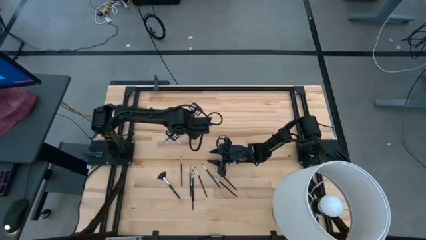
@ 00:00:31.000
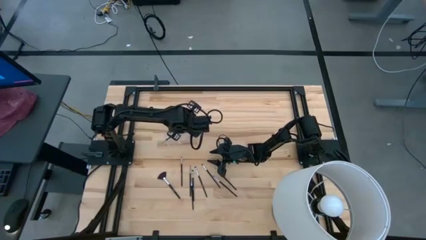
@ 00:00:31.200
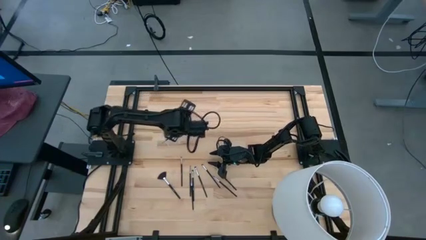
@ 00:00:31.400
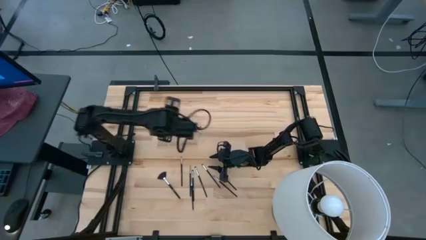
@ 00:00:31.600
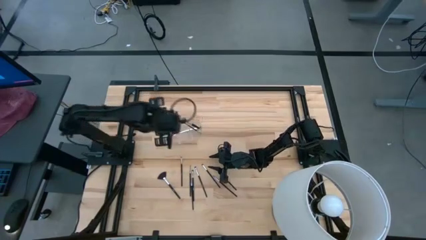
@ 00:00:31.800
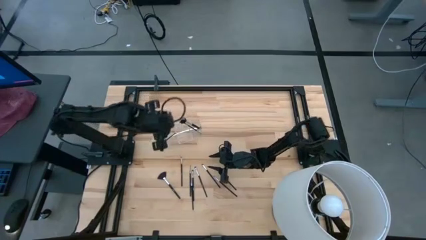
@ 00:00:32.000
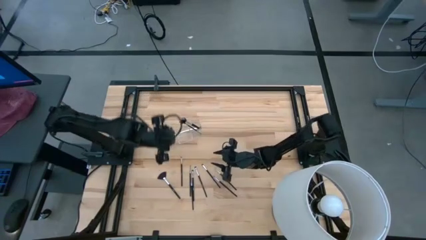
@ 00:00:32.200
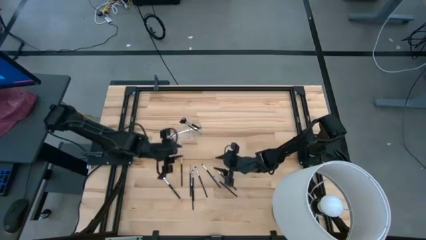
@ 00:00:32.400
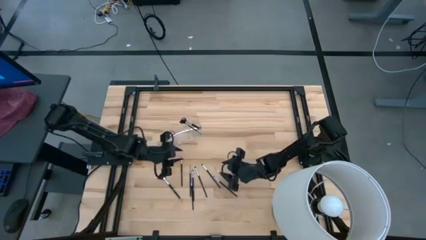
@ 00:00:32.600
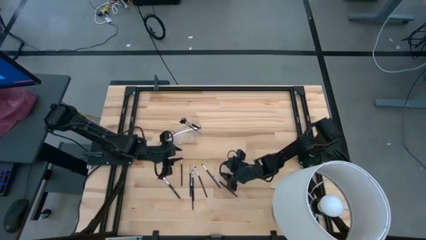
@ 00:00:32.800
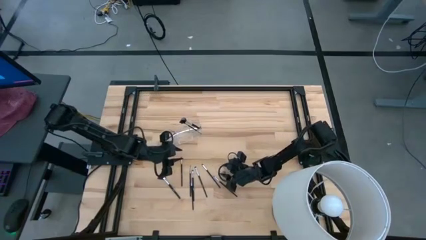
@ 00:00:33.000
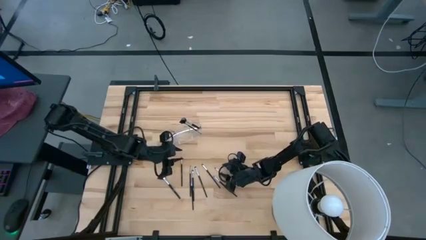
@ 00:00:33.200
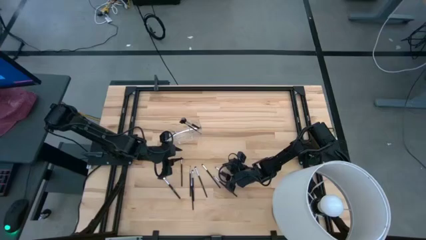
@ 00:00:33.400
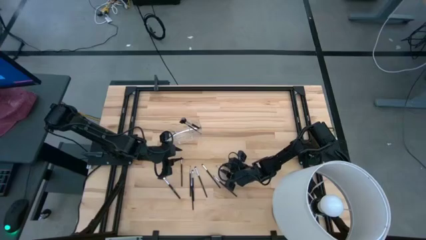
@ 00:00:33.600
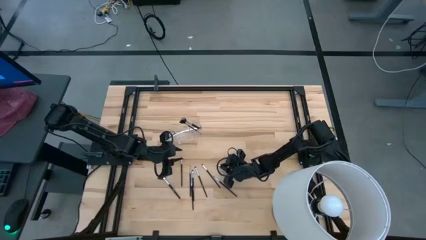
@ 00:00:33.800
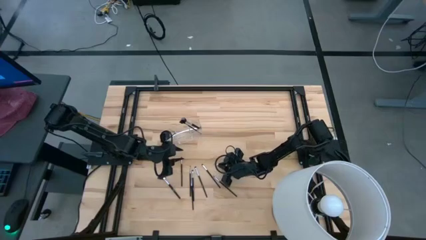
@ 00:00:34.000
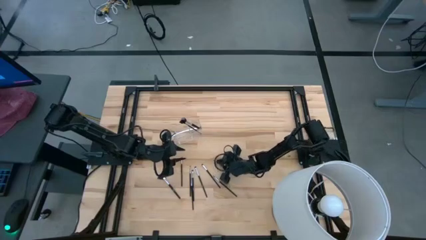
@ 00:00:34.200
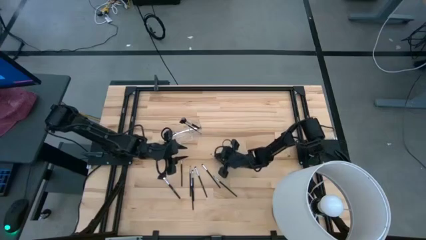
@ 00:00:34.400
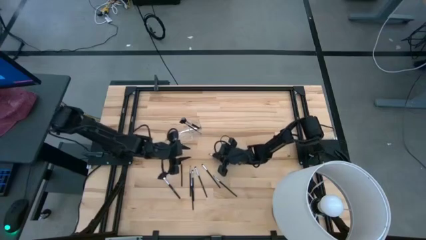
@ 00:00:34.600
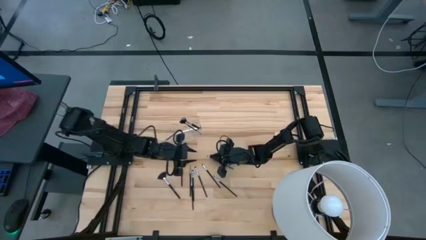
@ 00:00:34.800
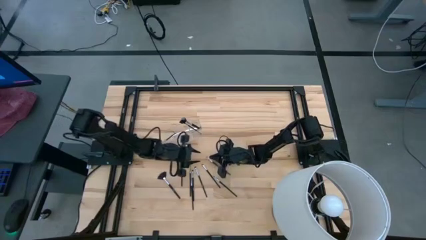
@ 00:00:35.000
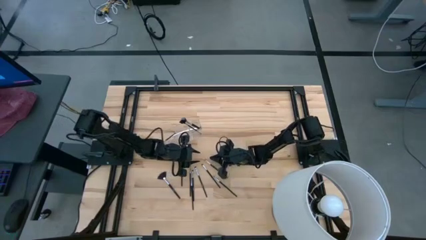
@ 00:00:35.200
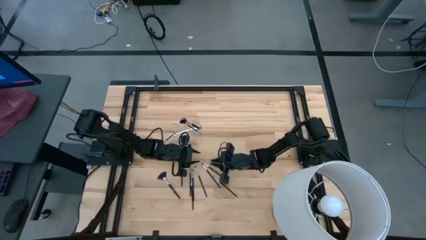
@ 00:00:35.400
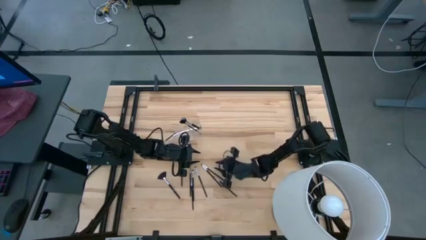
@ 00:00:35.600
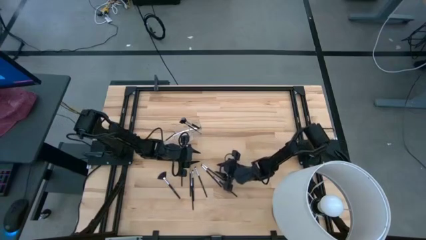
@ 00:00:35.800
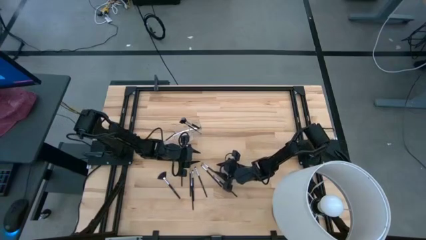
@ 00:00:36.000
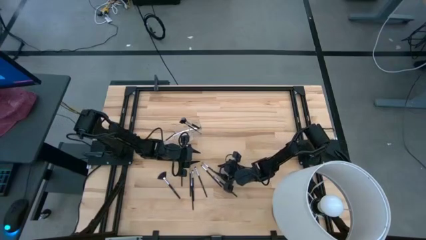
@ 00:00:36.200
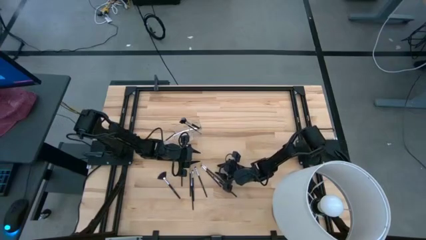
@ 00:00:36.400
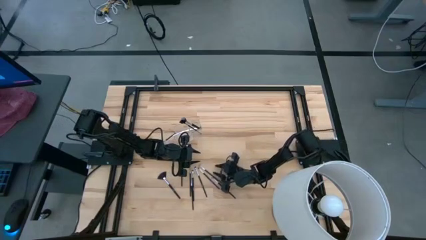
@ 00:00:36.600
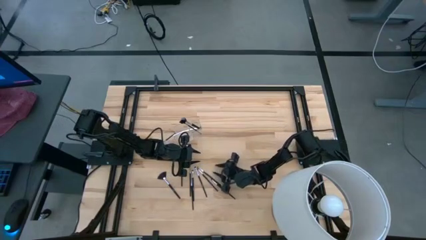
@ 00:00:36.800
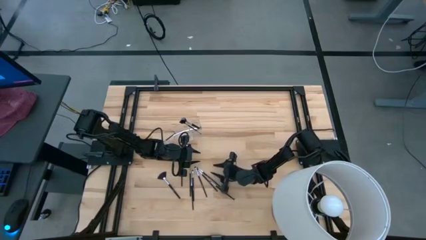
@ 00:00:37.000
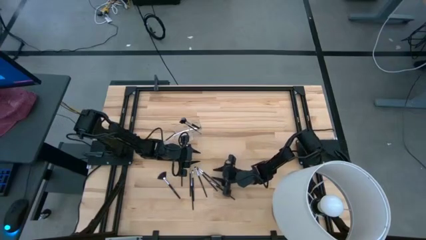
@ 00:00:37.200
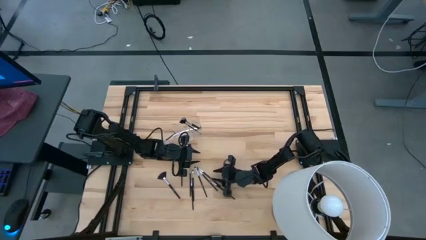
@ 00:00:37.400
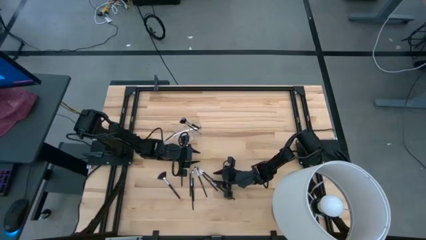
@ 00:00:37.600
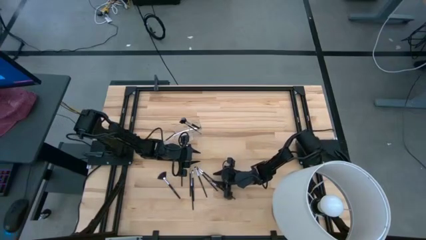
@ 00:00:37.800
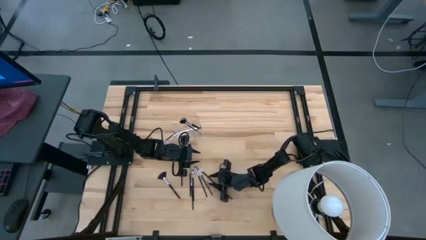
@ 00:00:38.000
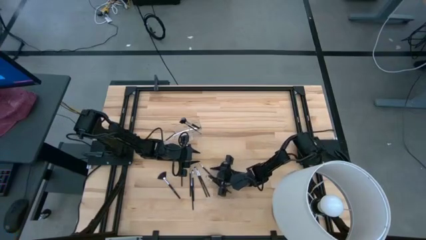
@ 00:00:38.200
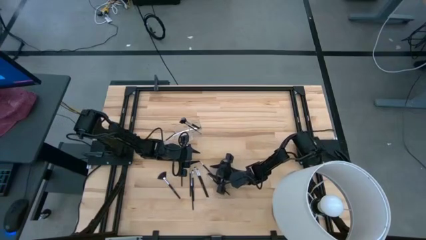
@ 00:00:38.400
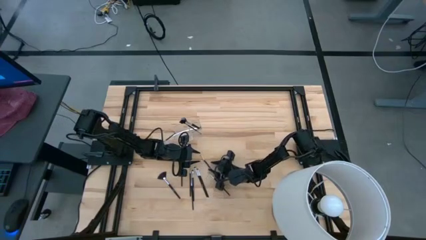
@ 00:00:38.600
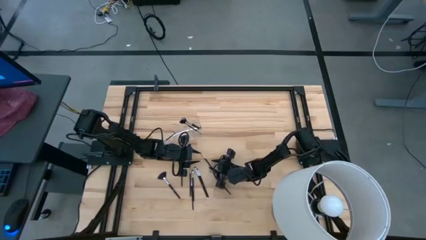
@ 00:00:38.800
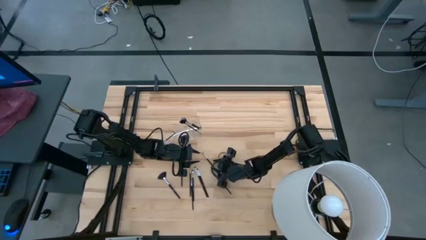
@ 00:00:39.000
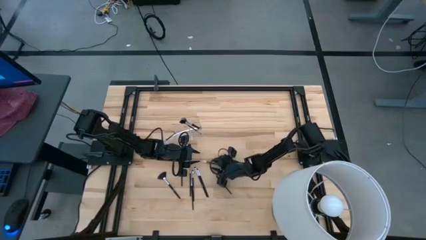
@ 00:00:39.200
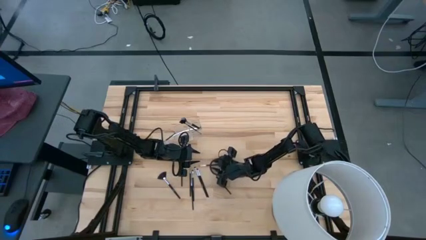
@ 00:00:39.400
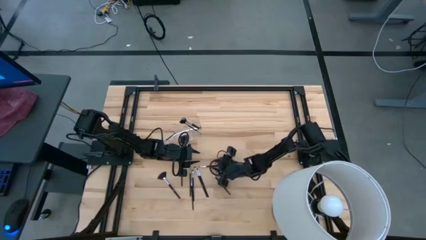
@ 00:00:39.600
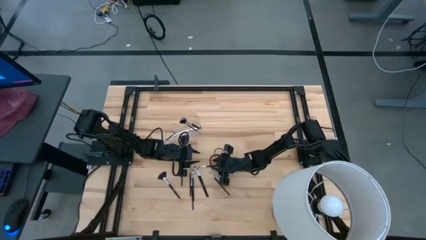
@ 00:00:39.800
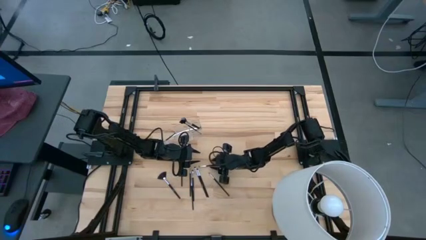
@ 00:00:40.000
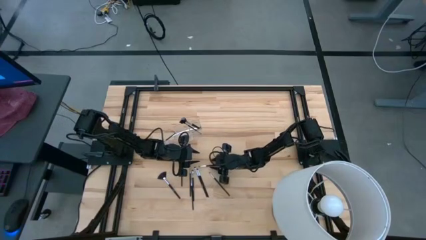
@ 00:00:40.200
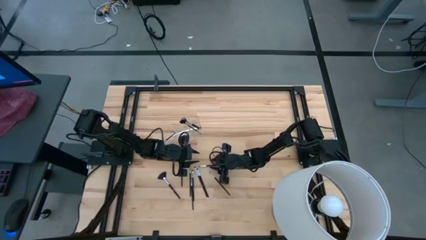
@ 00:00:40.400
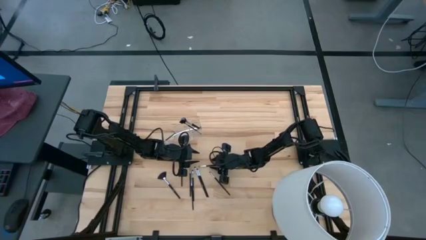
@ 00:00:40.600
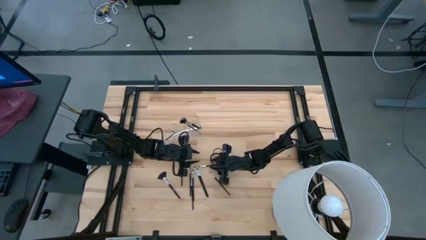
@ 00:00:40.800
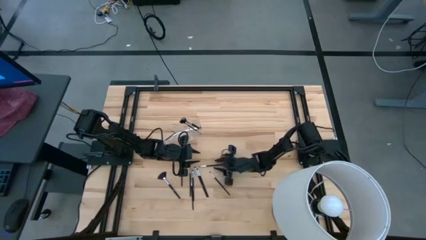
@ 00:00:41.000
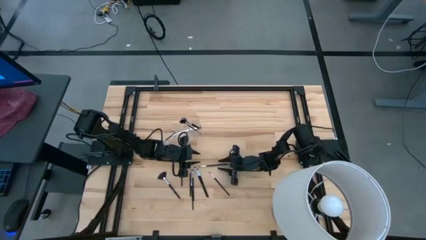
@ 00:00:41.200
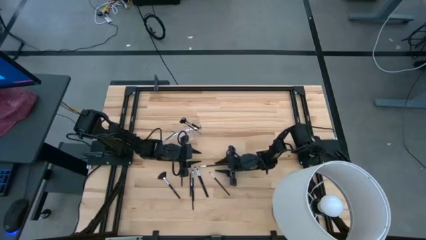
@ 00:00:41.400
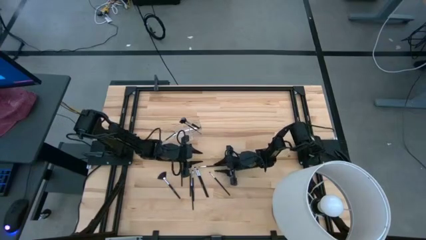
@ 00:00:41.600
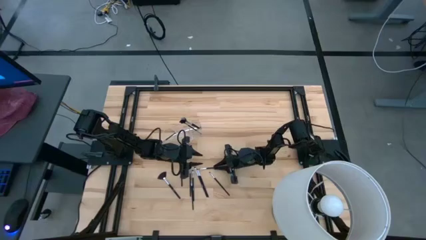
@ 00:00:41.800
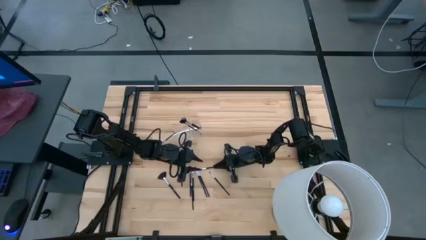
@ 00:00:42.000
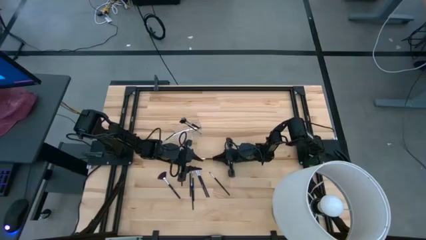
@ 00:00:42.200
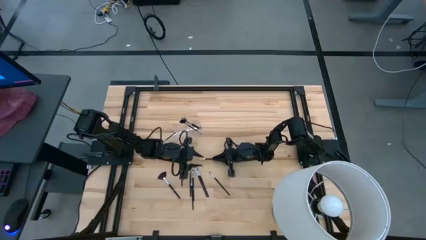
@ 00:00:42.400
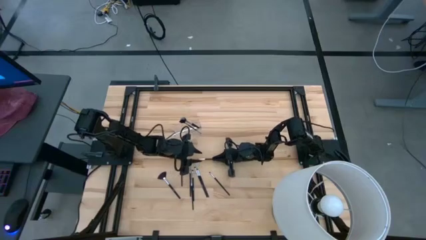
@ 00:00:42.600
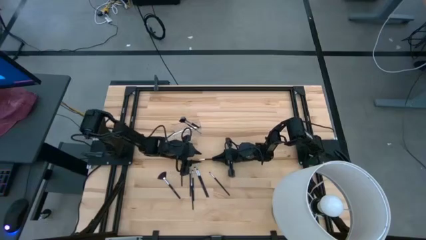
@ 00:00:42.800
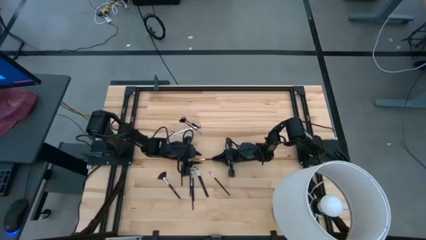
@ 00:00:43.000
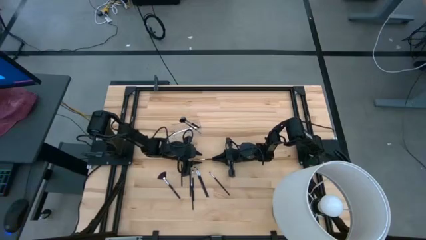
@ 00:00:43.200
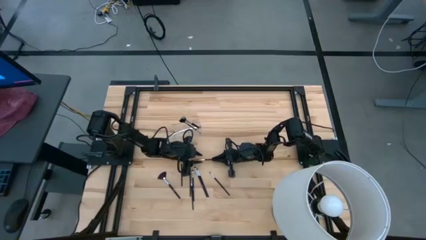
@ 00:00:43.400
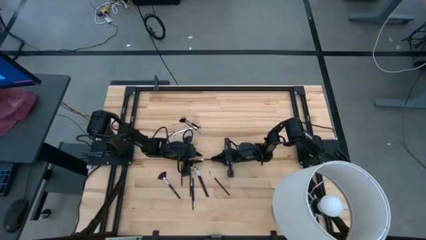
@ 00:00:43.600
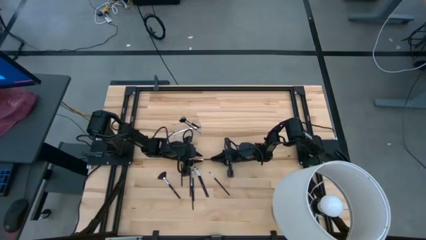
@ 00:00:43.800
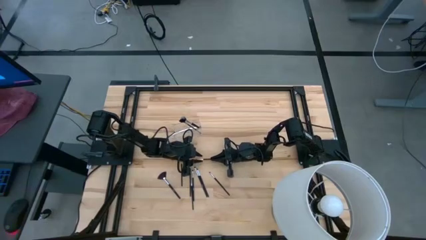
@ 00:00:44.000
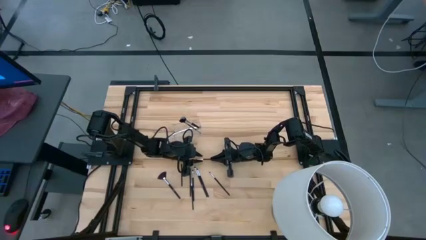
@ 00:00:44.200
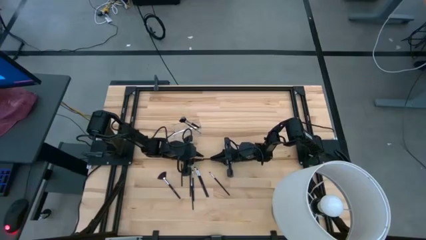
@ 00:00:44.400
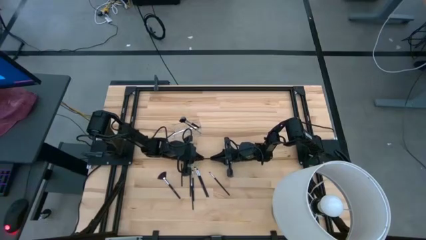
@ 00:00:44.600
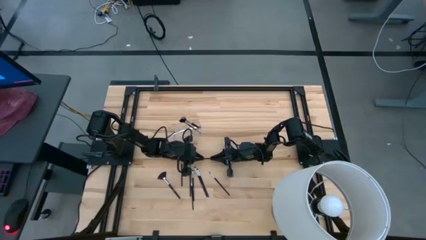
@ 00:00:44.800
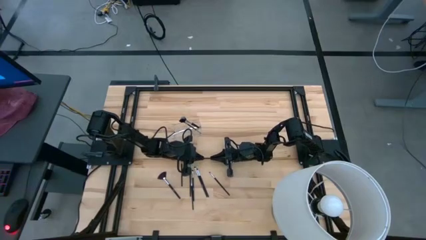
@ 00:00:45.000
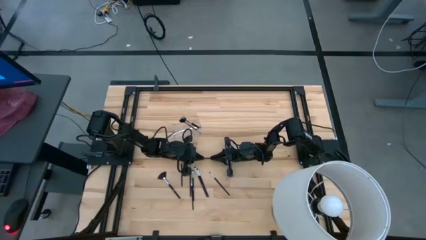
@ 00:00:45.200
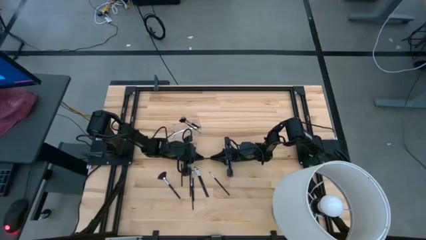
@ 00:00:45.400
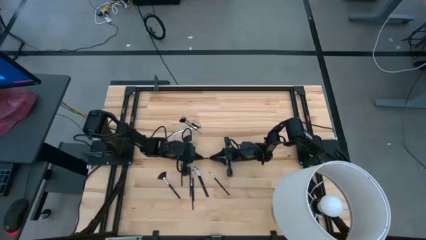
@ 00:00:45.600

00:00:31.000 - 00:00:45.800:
Task: Put items in baskets/containers
Put the eyeshadow brush into the left section of the transparent organizer
